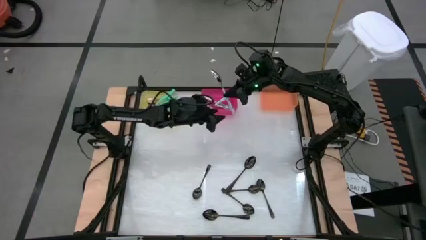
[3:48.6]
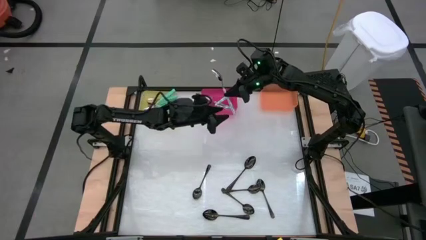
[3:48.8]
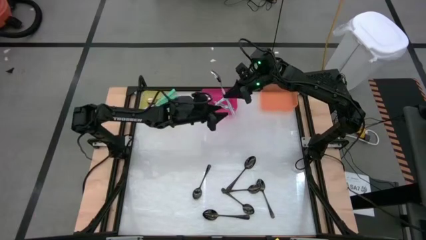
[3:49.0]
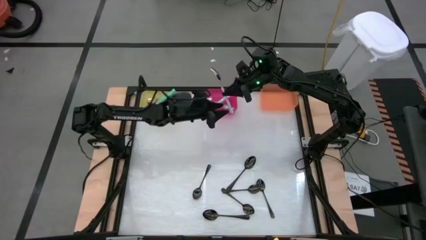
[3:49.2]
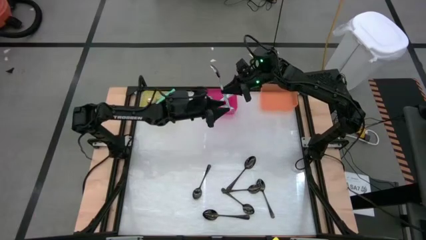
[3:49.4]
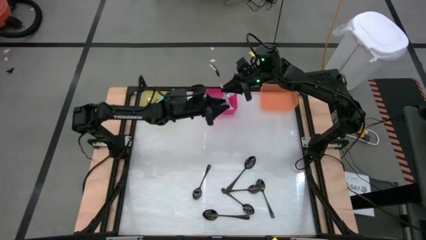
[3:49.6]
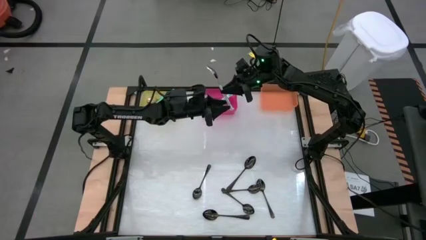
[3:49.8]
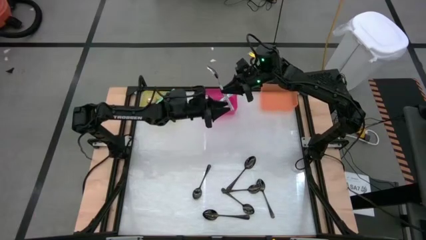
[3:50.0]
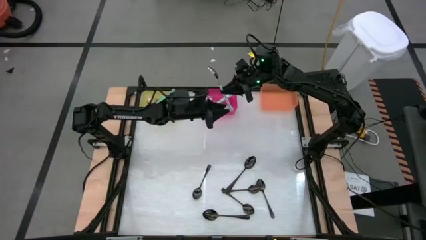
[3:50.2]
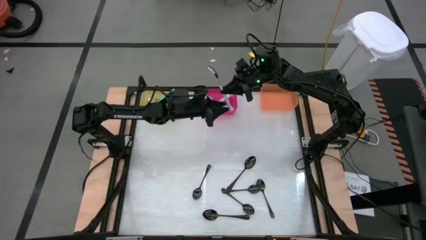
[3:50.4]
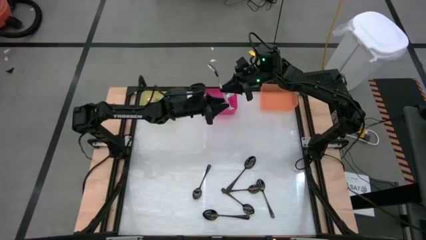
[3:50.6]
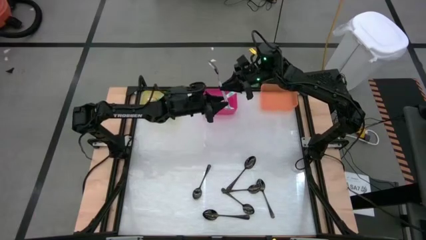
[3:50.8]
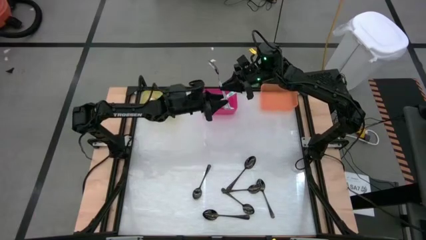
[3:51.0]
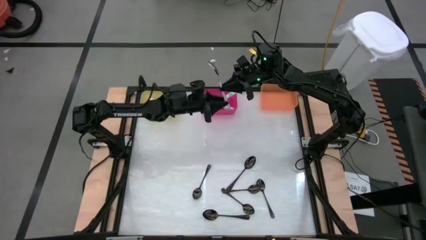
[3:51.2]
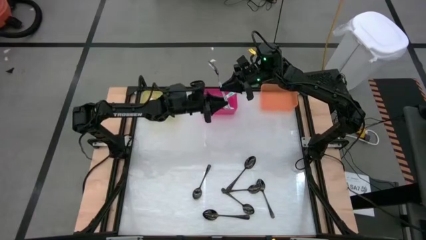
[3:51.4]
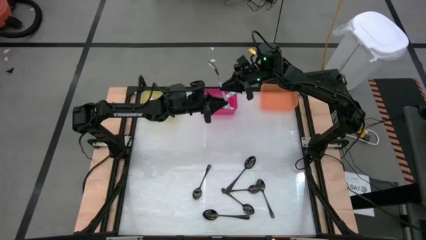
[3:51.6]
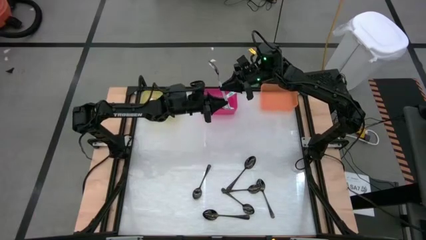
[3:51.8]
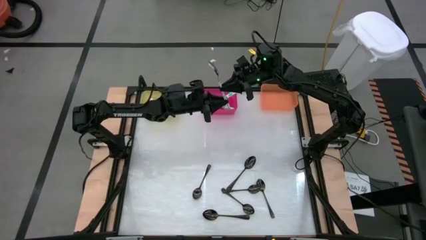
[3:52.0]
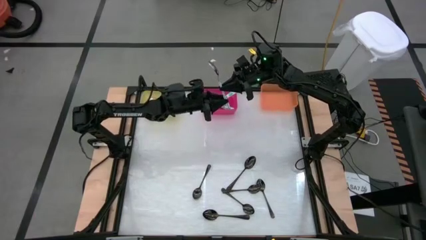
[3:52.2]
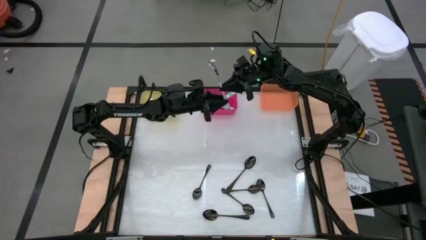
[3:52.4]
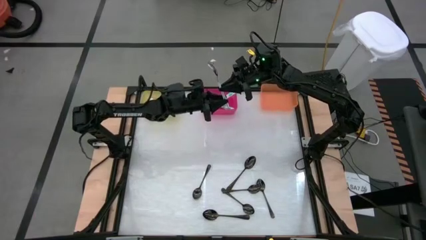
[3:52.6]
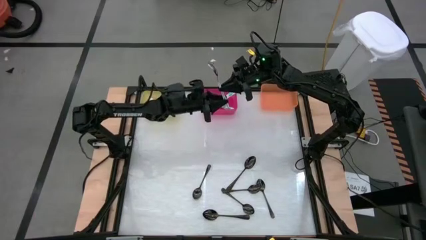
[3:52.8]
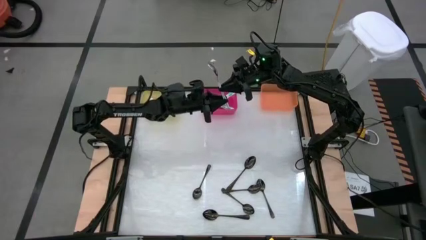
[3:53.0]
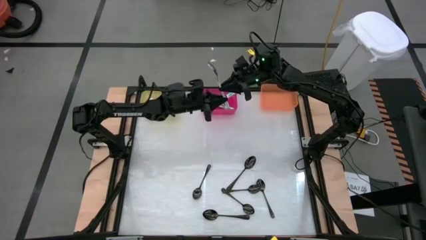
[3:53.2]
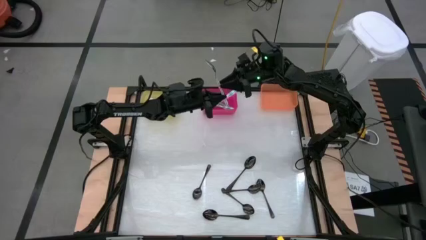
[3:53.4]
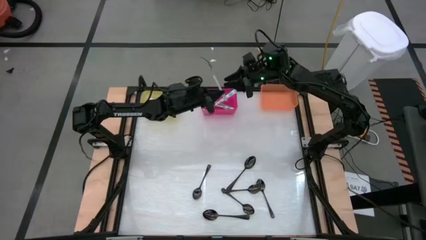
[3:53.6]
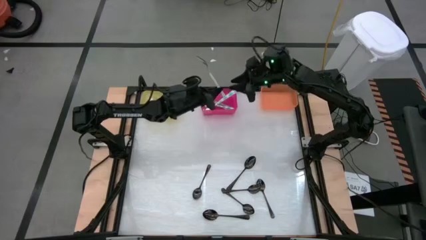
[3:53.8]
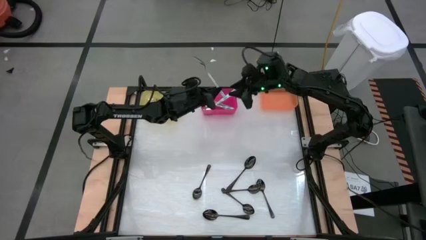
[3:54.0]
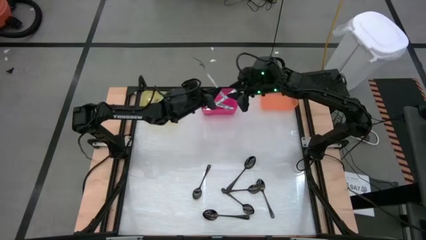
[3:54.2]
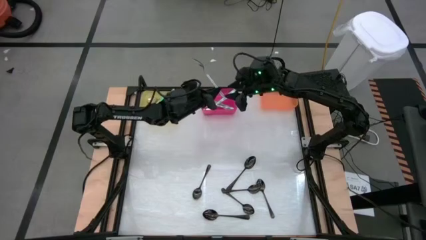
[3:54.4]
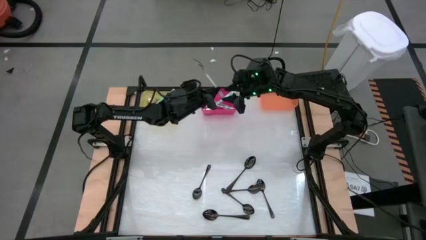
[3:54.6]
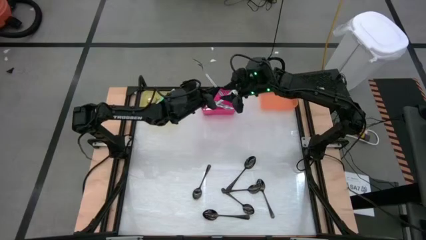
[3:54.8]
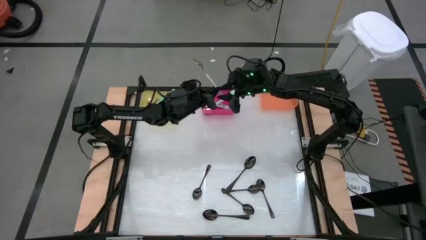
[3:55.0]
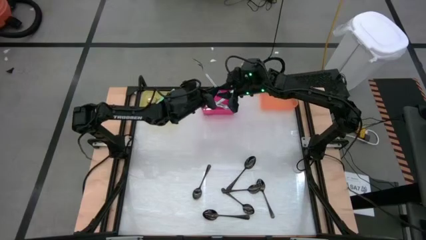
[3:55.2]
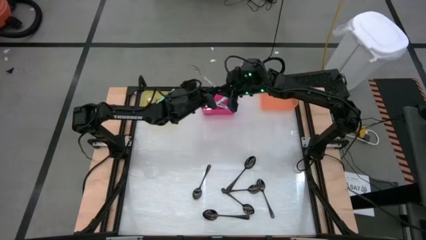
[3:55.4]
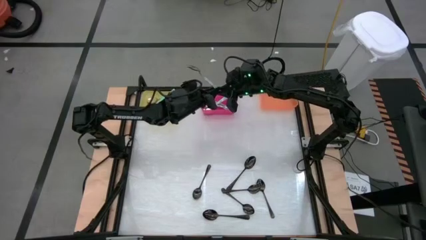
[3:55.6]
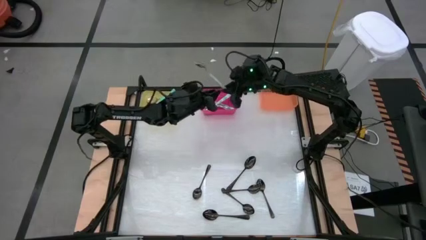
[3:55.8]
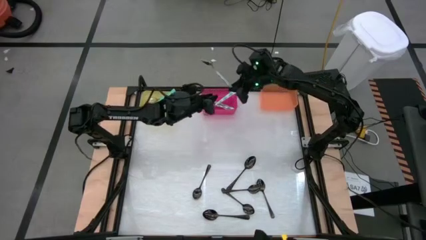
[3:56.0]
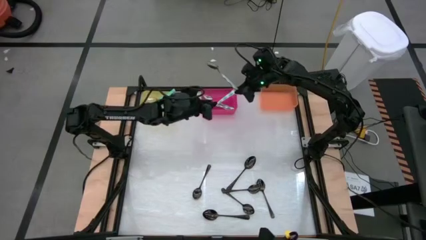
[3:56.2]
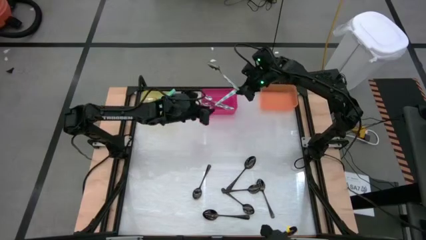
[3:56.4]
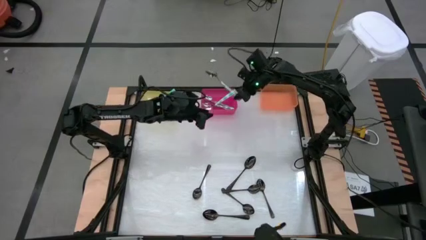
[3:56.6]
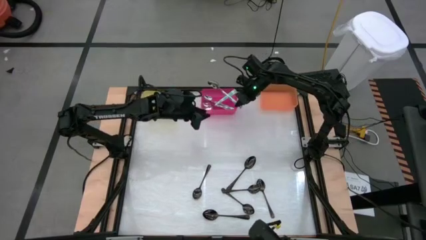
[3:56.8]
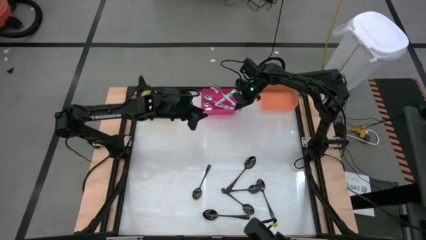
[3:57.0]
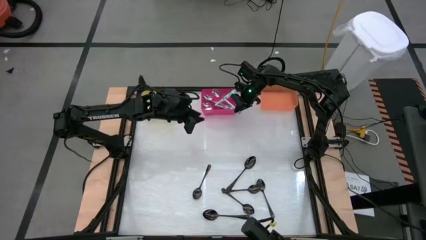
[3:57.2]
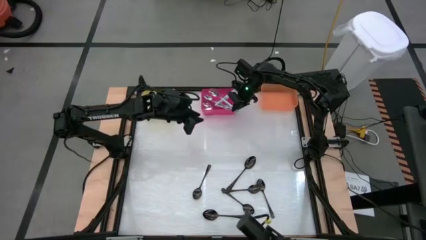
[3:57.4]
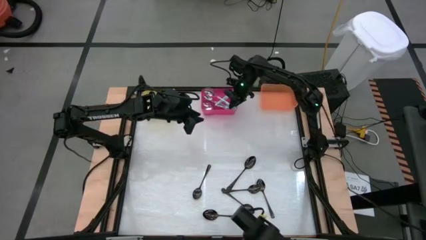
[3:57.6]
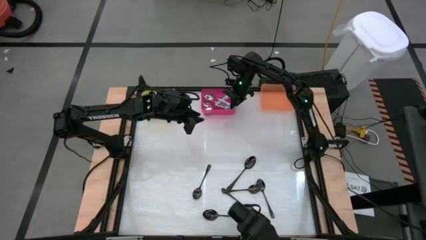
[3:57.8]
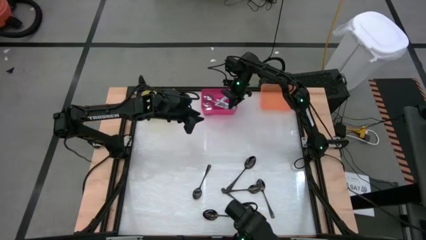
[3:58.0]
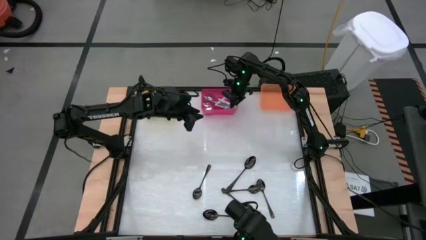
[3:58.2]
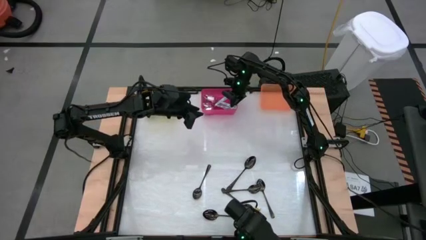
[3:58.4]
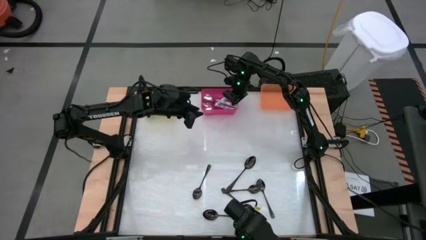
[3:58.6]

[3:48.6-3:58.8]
Task: Sort silverware by color (type)
Put the white patterned spoon into the pink bin
